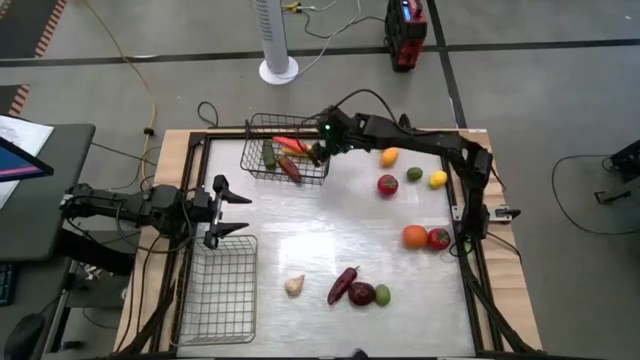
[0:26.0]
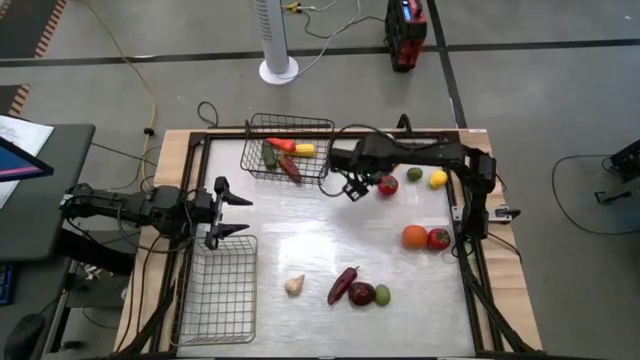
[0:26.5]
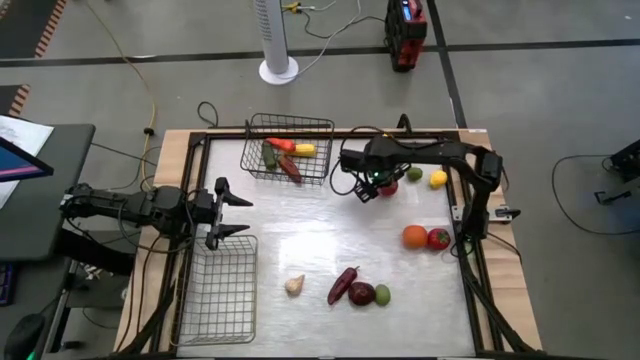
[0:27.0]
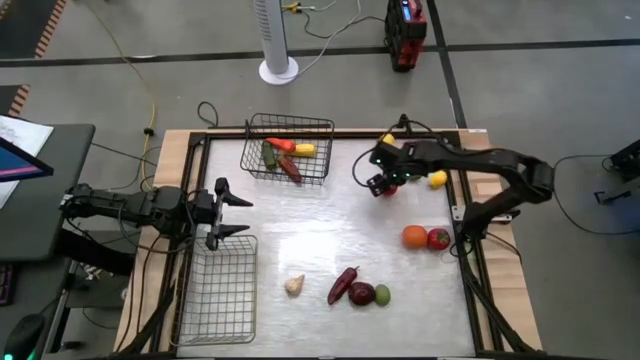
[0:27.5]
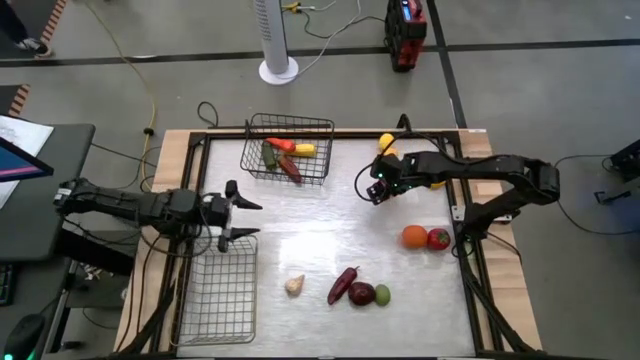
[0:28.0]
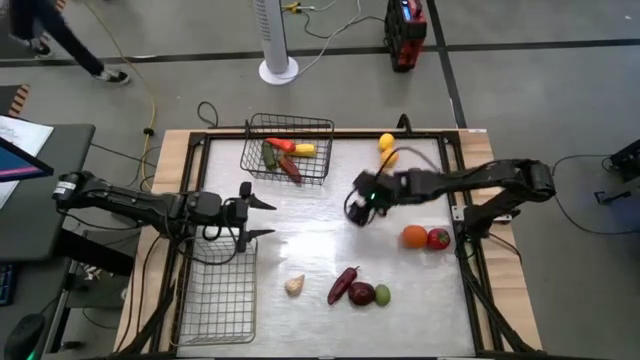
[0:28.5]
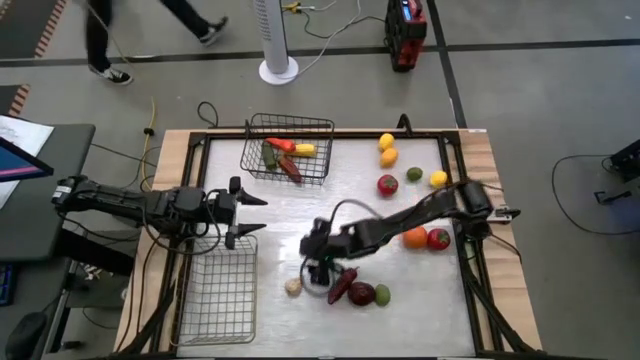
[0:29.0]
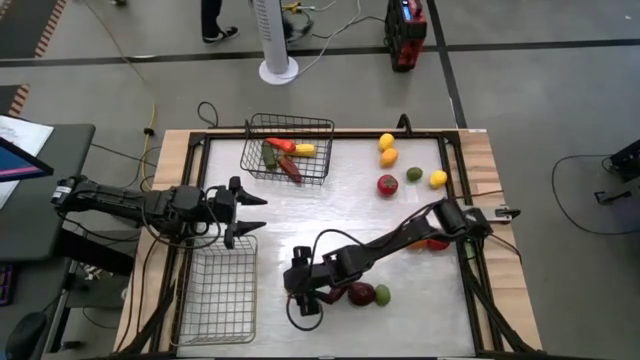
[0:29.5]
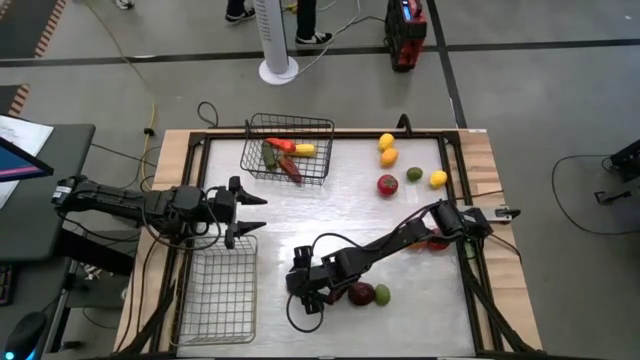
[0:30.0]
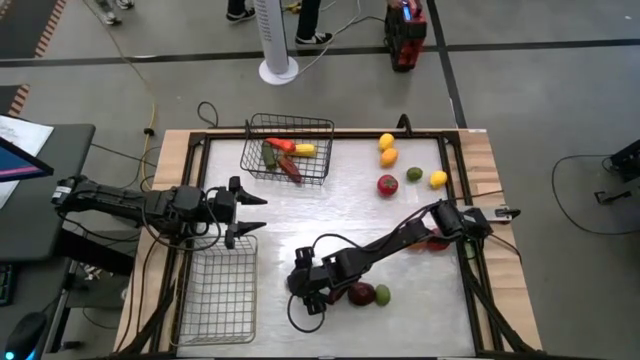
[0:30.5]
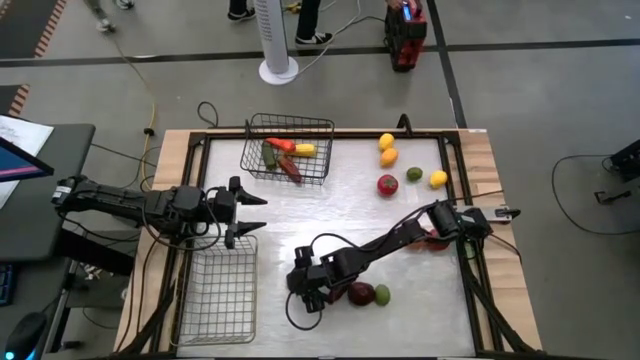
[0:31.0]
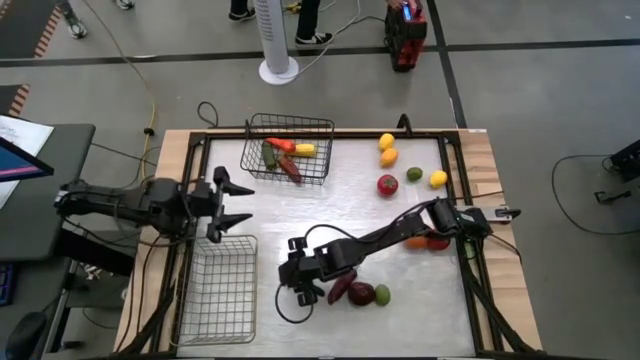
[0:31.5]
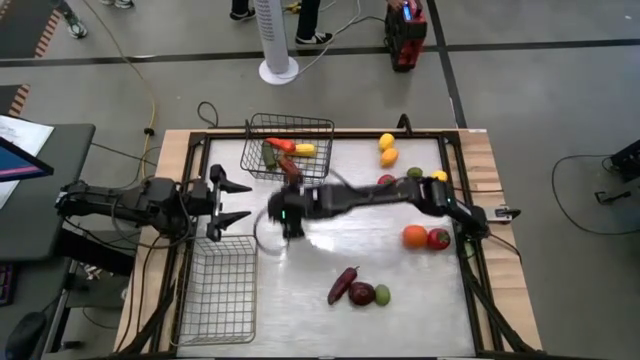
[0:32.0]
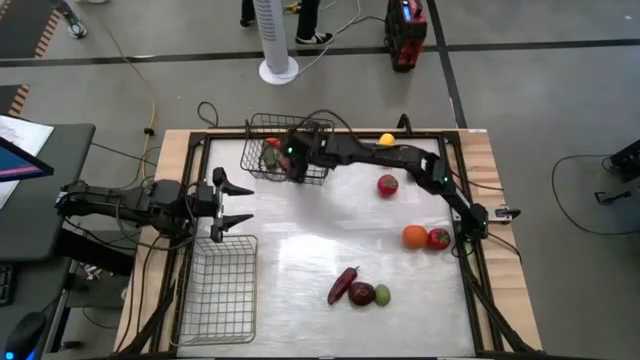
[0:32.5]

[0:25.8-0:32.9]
Task: Sort produce into baskets
Put the white garlic into the black wire basket

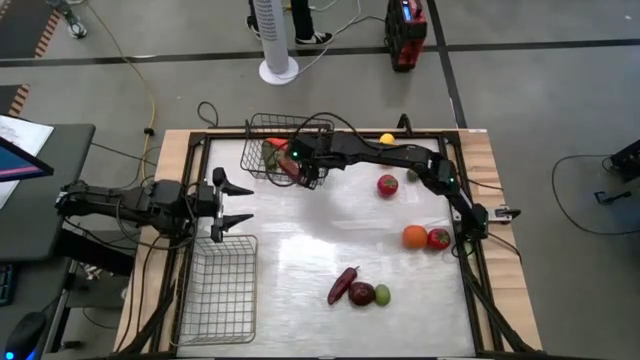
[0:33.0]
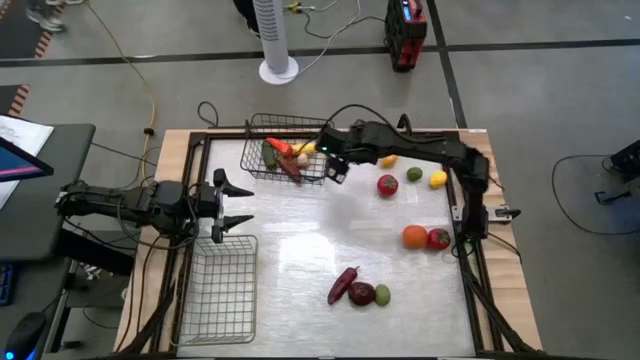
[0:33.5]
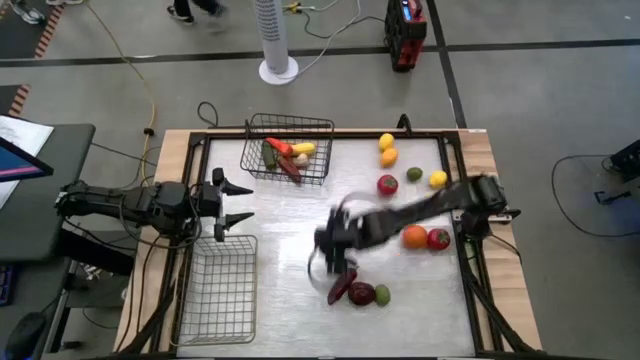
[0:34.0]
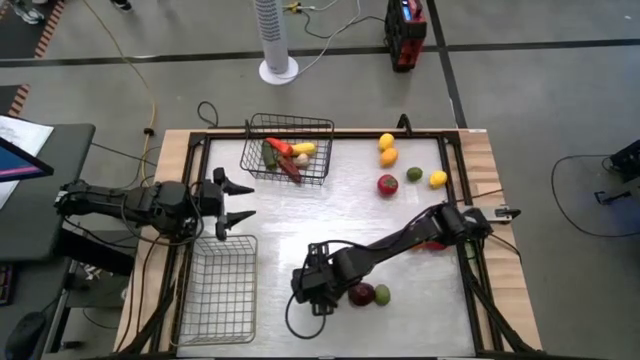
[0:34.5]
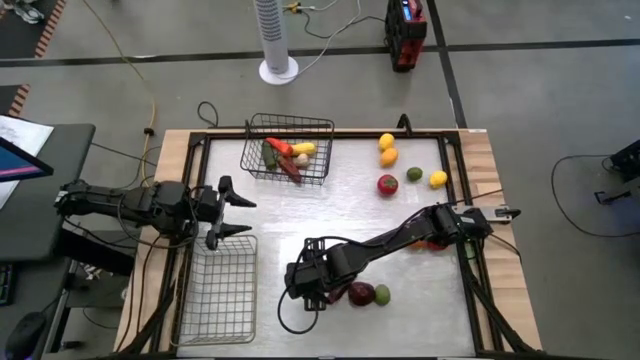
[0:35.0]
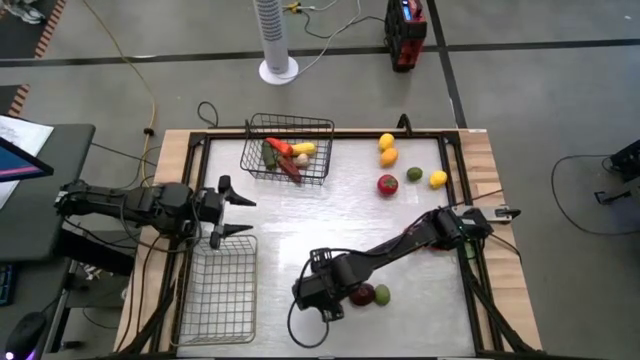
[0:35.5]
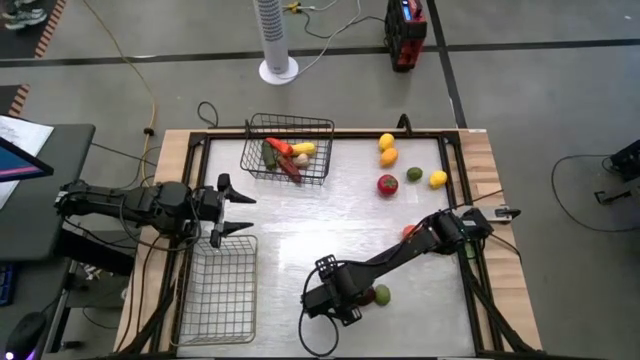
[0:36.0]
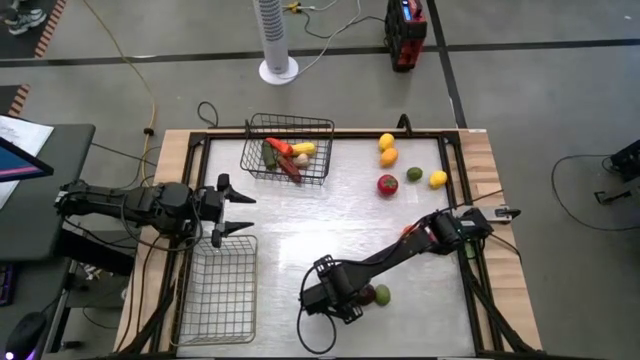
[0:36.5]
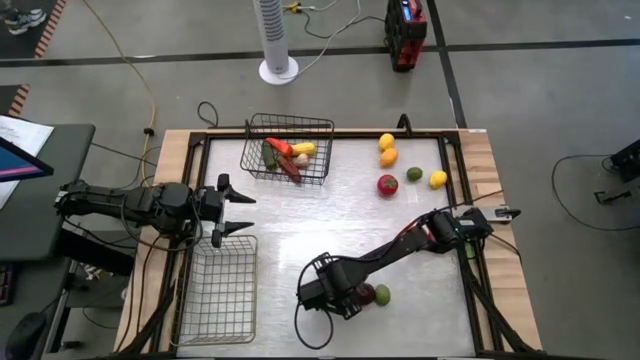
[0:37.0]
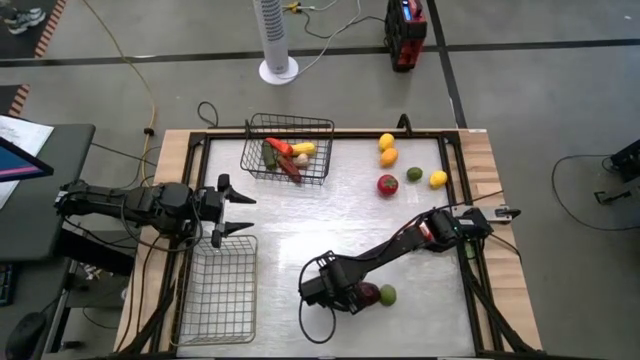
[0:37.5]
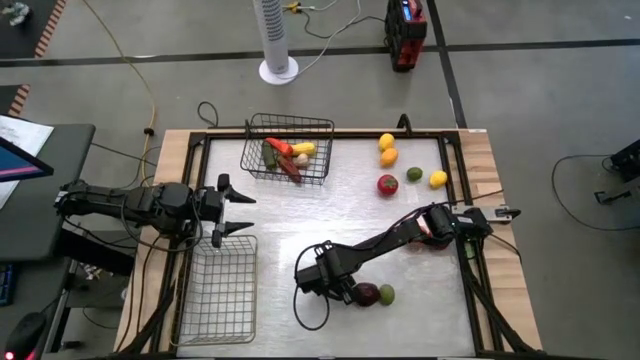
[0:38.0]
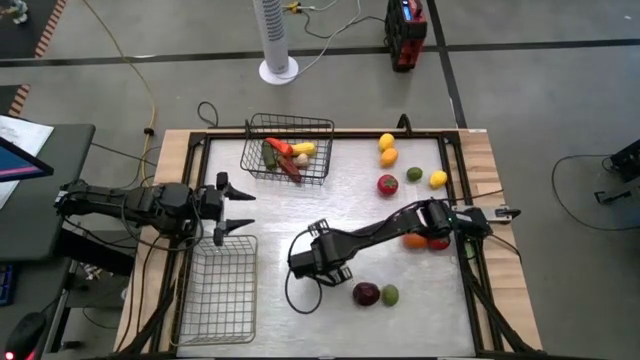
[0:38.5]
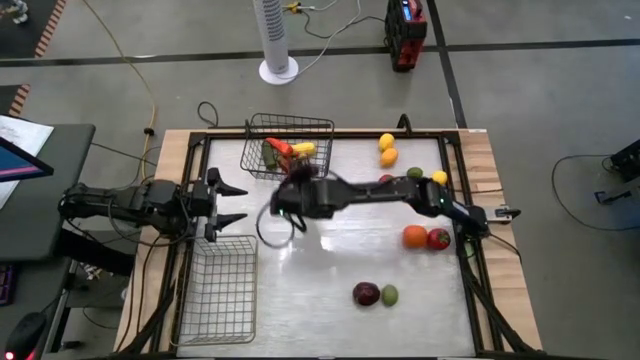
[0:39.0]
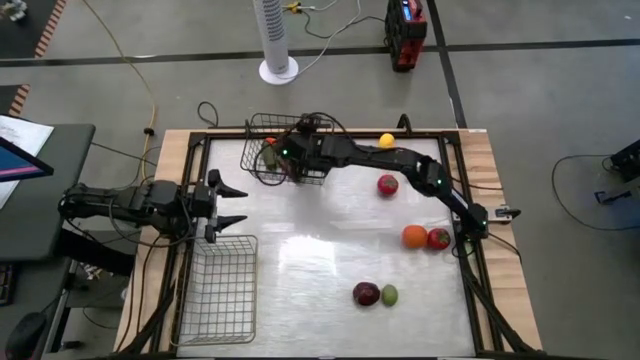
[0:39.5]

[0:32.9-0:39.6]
Put the red chili pepper into the black wire basket

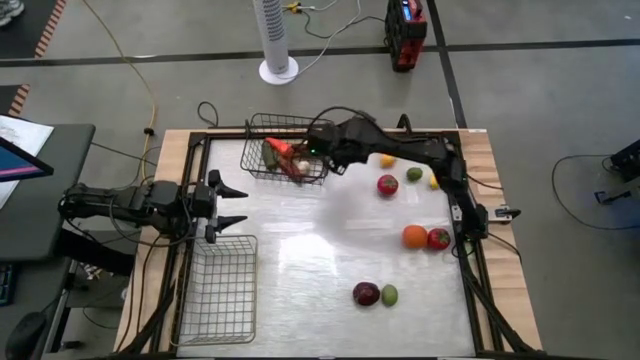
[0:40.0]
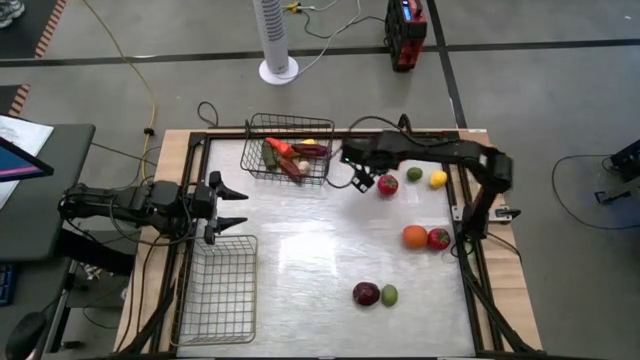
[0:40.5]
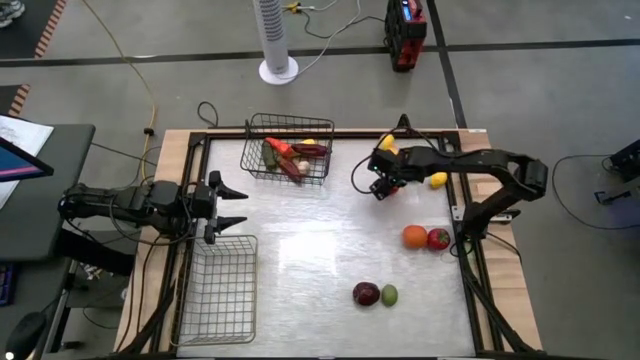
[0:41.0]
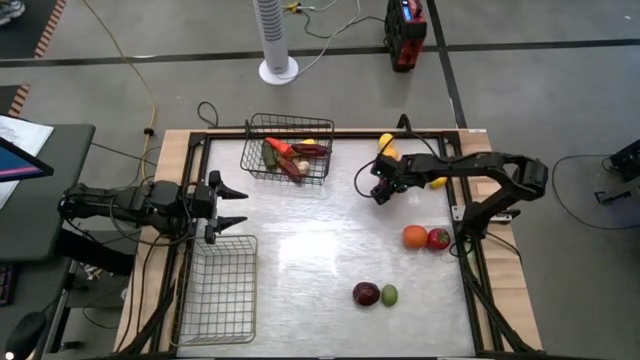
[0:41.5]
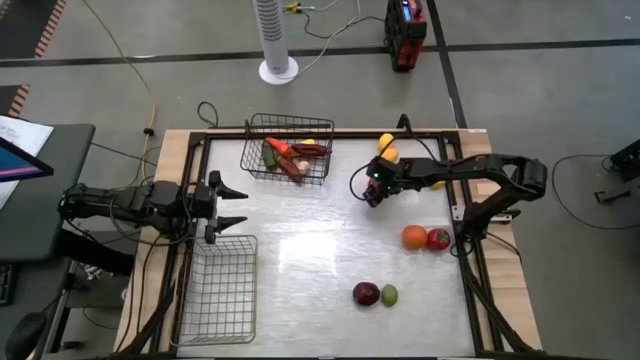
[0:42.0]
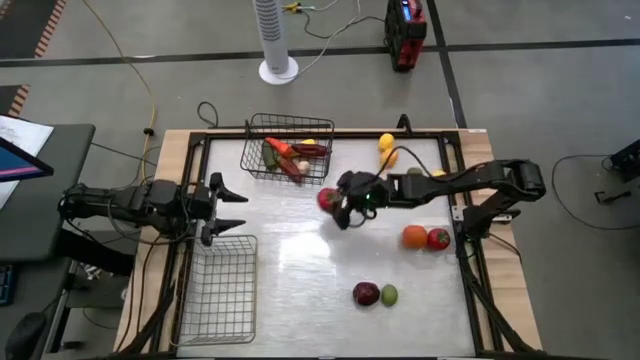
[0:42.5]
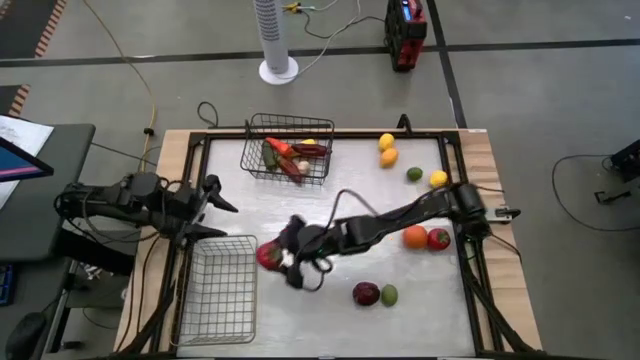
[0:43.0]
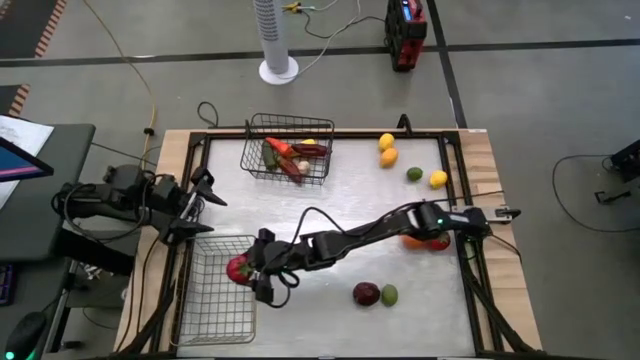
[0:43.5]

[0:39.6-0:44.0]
Put the top red tomato into the silver wire basket

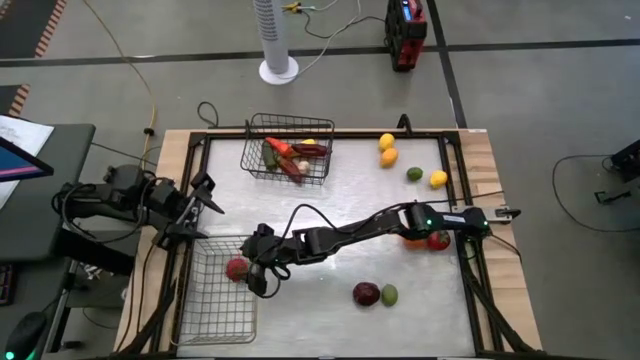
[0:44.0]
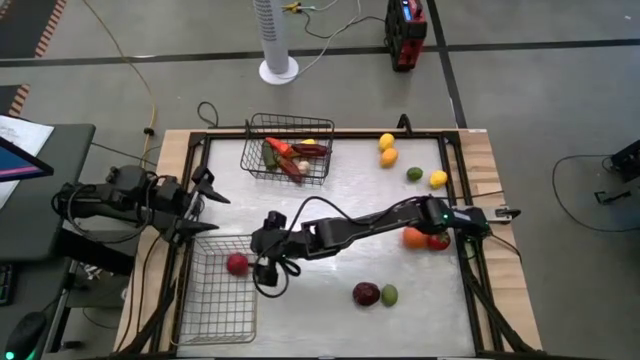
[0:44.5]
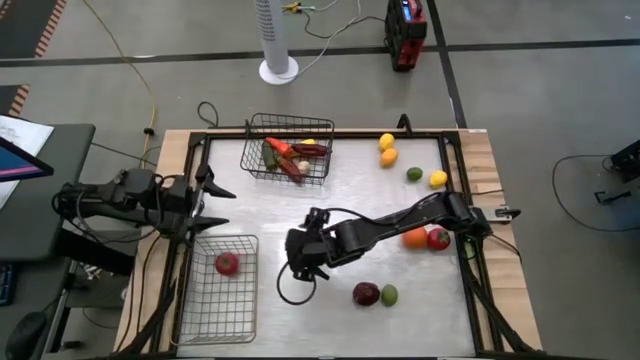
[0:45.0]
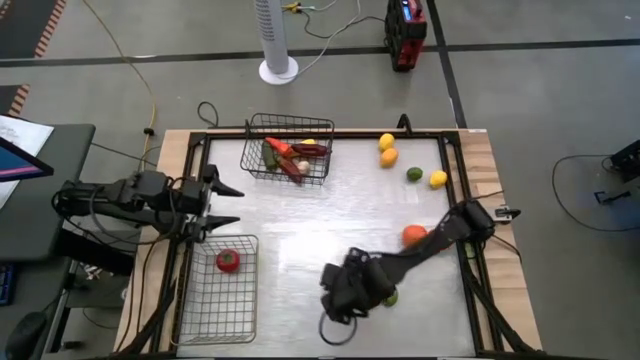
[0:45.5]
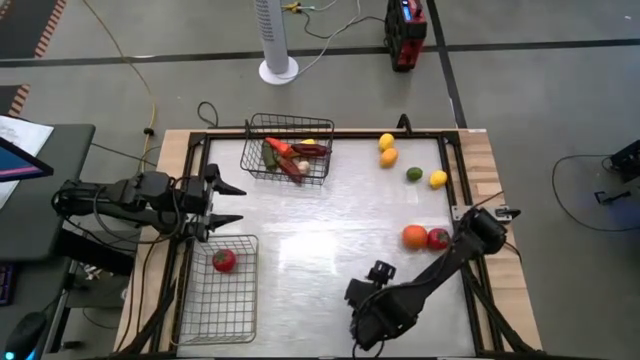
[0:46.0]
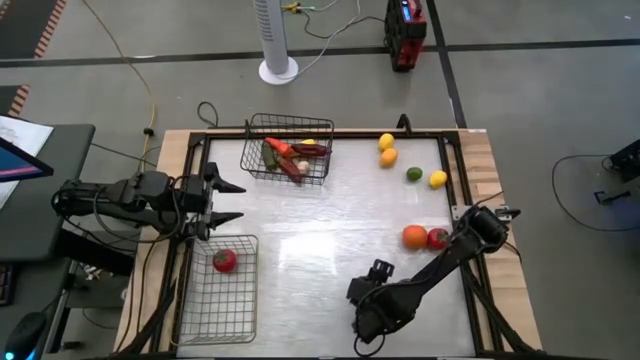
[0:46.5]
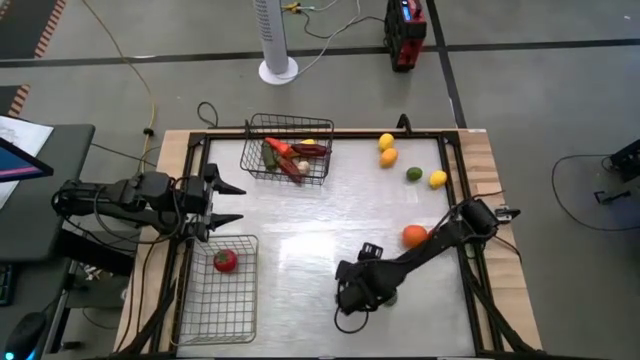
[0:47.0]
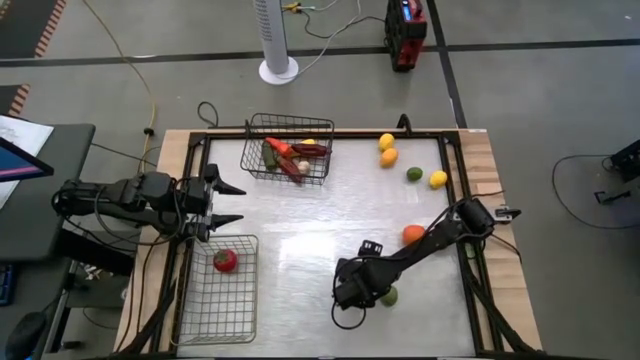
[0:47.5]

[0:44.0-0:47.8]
Put the red apple into the silver wire basket
